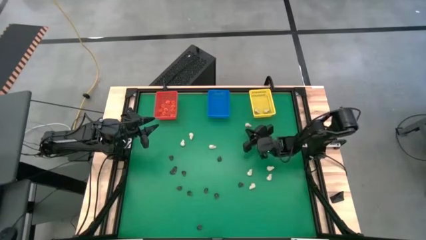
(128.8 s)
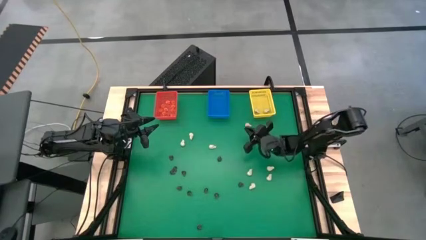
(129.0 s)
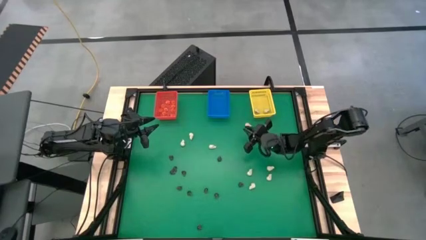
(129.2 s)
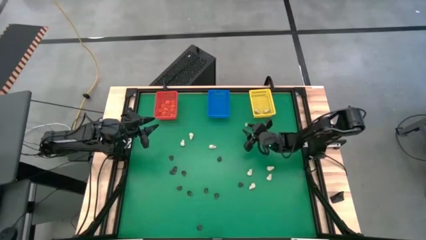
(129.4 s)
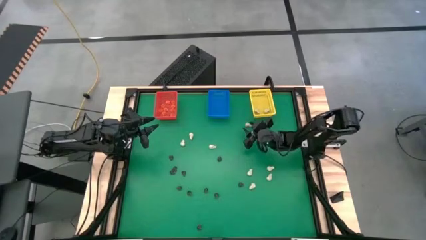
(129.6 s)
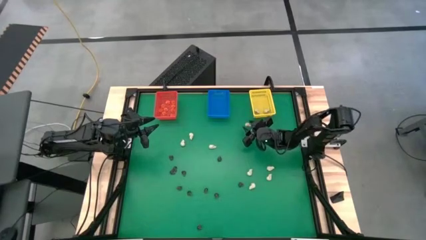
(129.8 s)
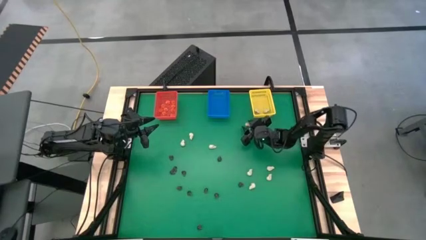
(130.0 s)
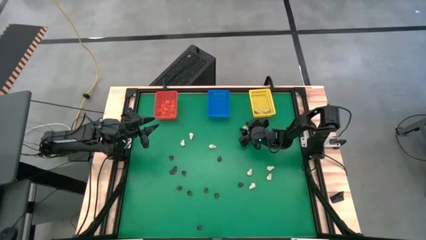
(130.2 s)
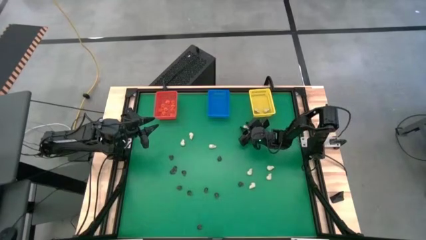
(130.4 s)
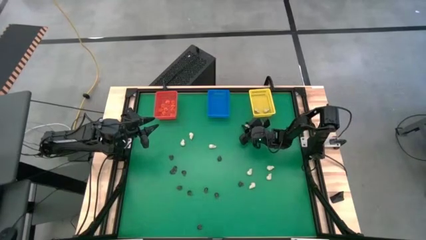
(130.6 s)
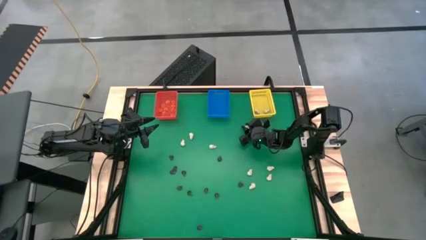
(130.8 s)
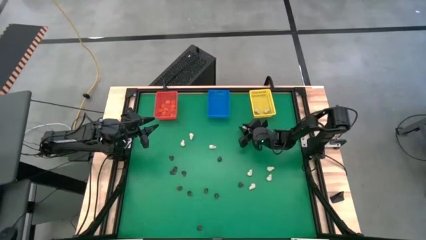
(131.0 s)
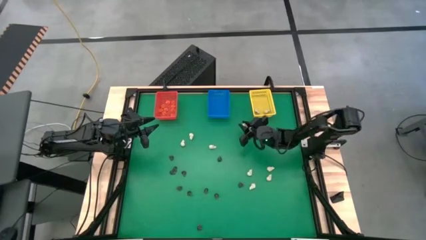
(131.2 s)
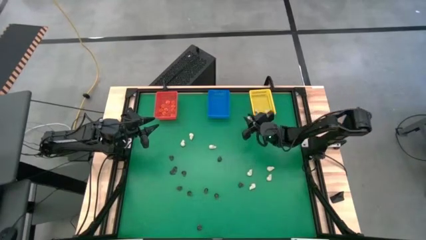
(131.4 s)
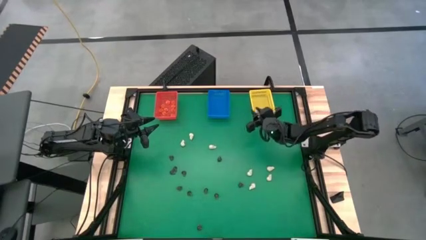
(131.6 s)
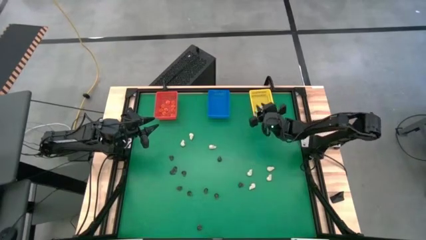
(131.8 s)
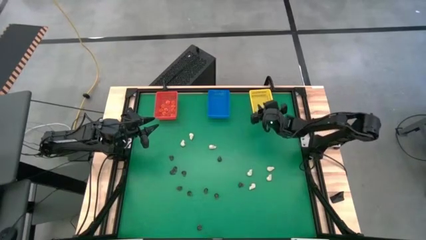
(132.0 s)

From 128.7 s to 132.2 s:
Task: Sort Halloween decoration
Put the white skull toy into the yellow bin

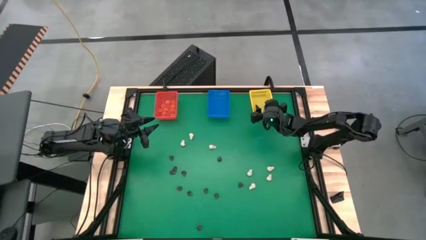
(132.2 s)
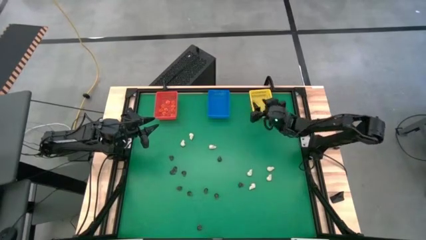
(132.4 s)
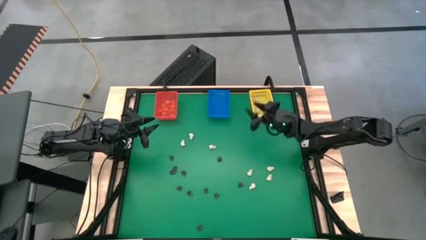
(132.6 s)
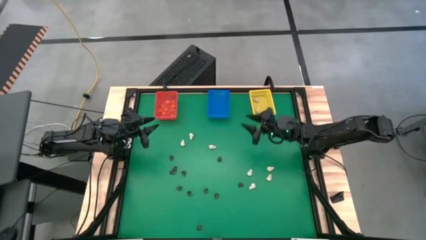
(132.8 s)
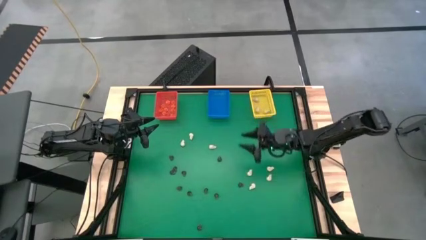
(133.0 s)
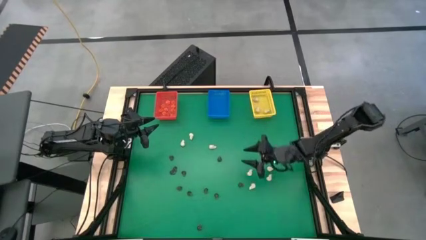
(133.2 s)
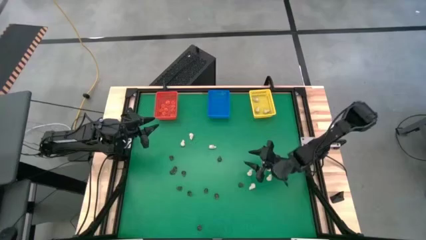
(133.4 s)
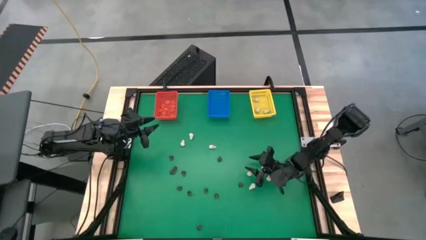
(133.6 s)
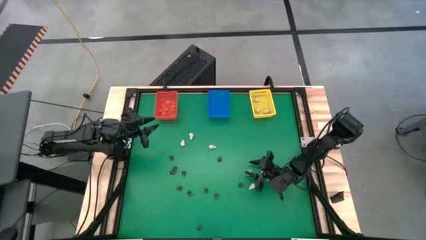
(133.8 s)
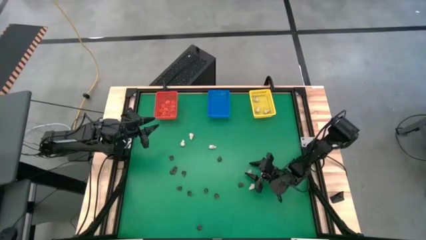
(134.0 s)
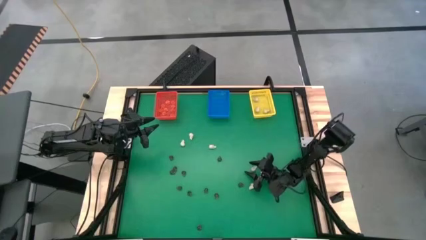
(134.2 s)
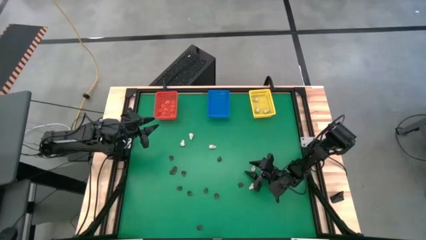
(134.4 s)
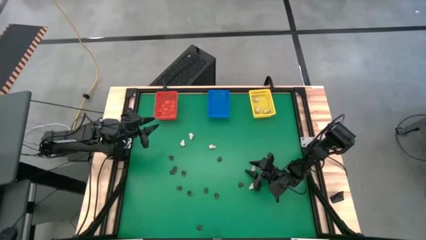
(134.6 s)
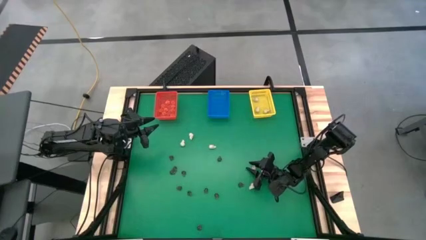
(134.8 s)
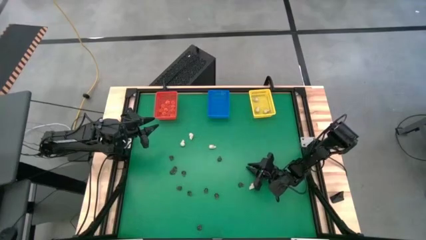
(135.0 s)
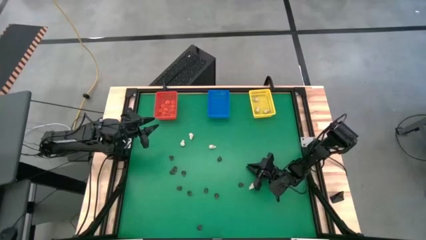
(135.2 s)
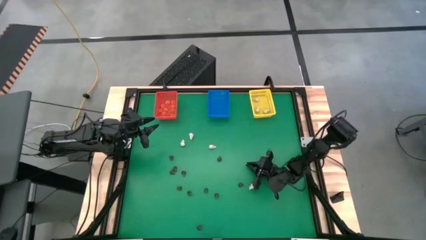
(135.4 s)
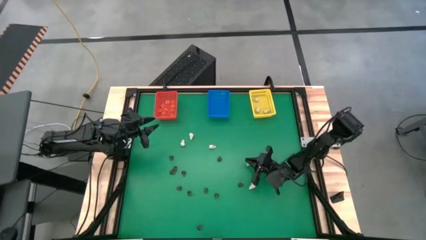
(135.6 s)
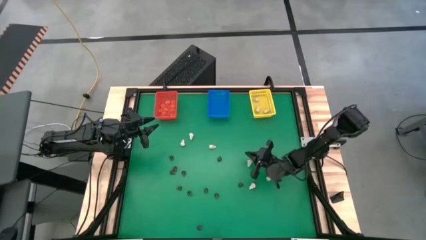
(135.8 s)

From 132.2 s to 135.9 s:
Put the white skull toy into the yellow bin

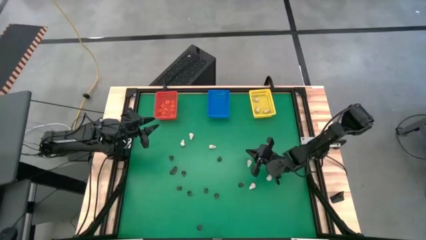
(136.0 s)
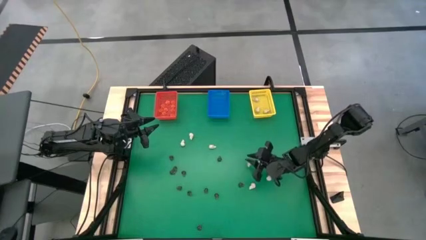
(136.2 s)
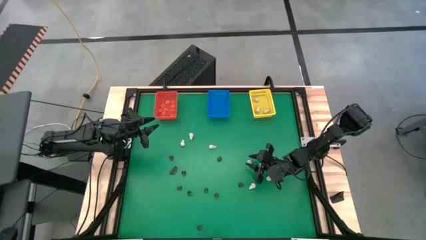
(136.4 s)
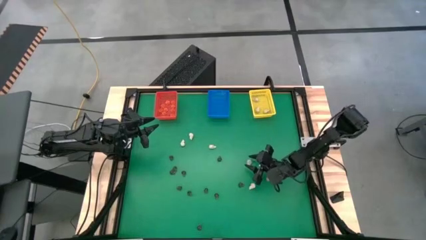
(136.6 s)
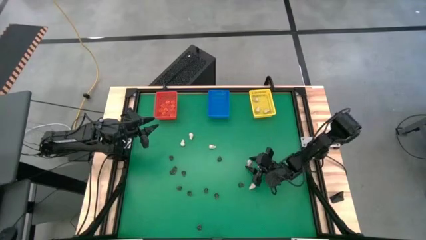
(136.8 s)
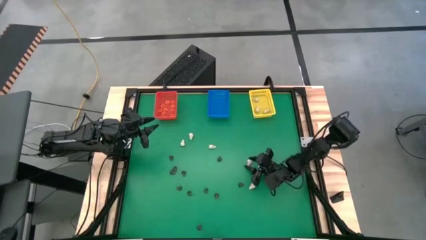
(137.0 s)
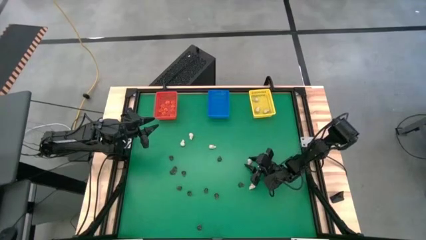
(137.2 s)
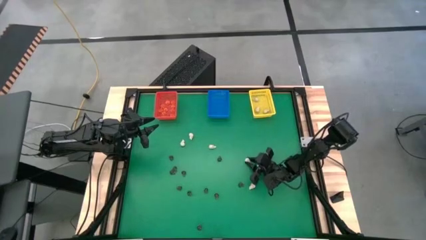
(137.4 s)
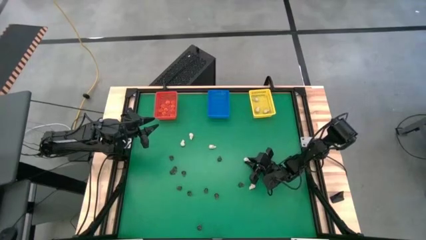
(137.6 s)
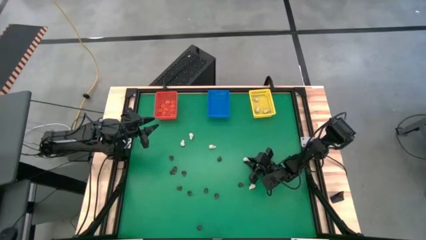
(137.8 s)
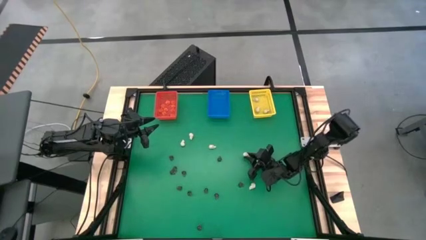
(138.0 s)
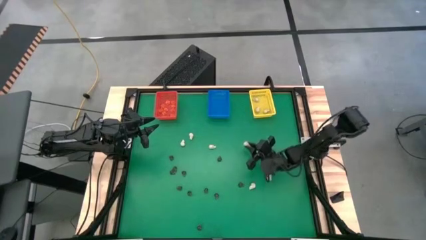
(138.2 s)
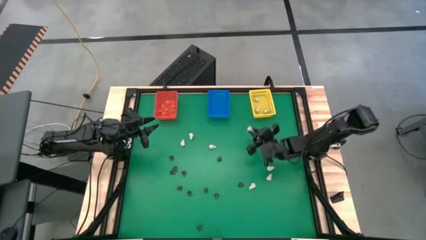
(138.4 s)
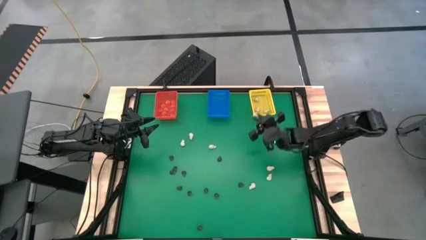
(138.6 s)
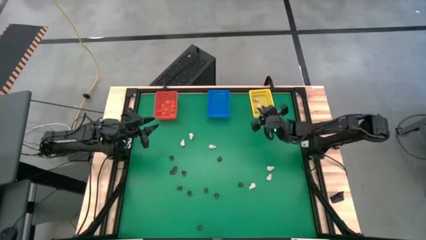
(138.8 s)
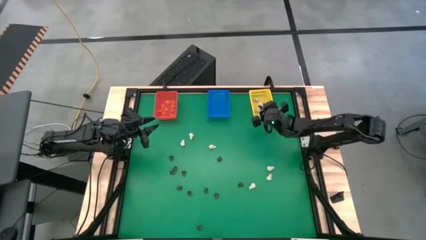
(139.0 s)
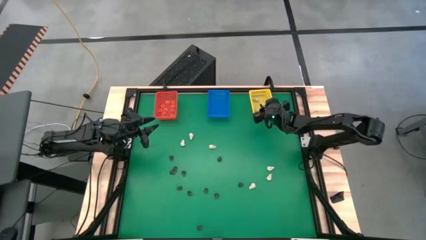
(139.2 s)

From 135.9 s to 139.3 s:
Put the white skull toy into the yellow bin

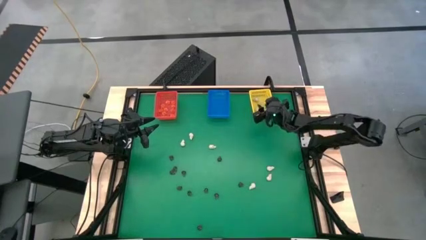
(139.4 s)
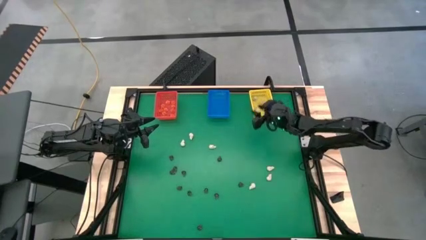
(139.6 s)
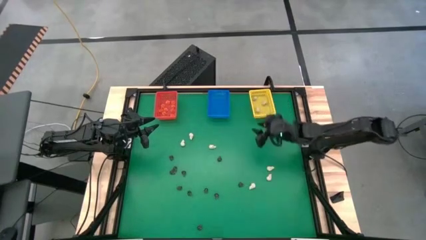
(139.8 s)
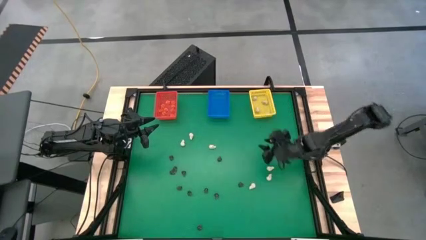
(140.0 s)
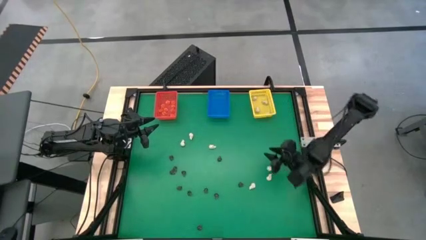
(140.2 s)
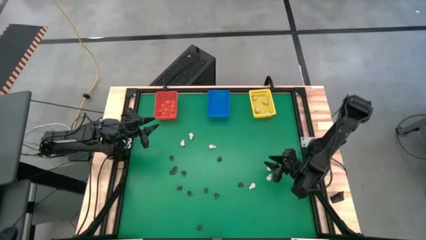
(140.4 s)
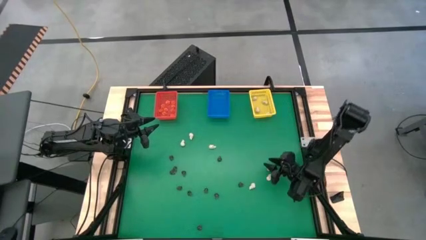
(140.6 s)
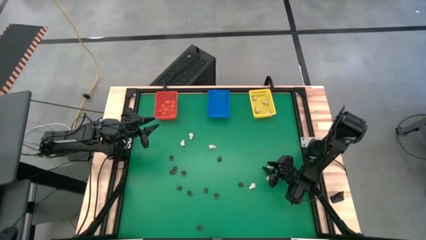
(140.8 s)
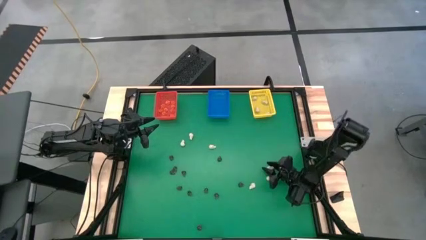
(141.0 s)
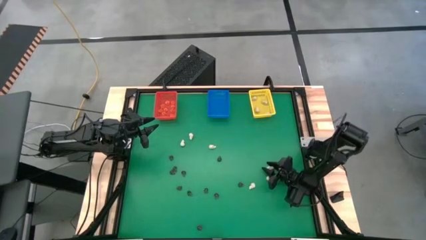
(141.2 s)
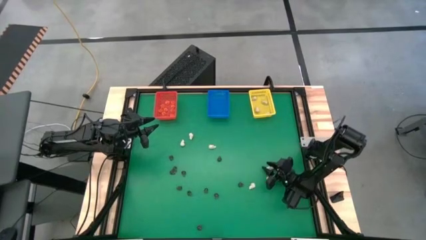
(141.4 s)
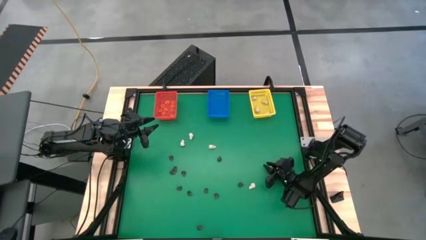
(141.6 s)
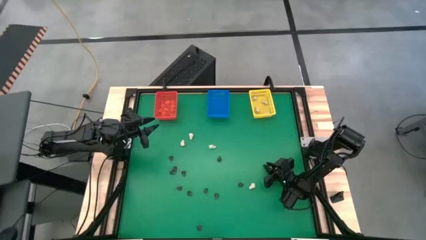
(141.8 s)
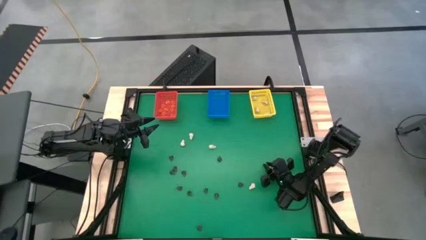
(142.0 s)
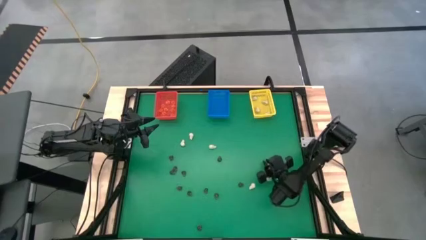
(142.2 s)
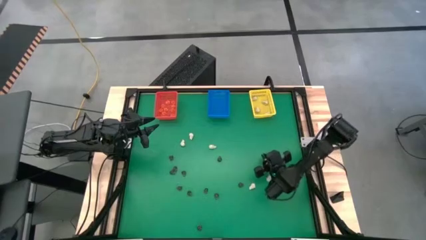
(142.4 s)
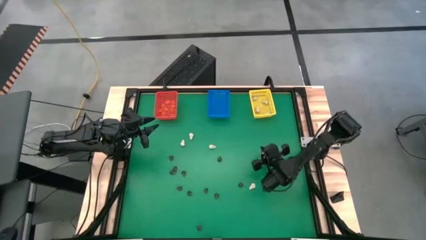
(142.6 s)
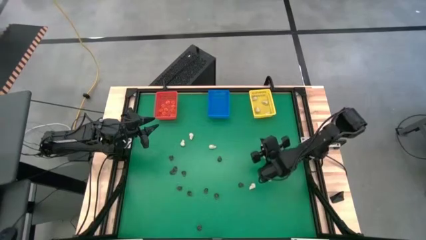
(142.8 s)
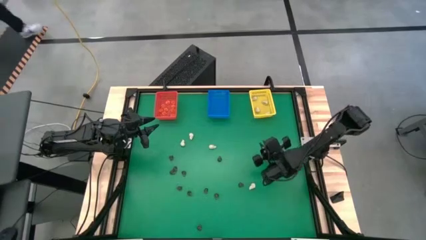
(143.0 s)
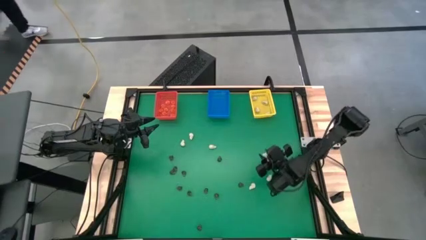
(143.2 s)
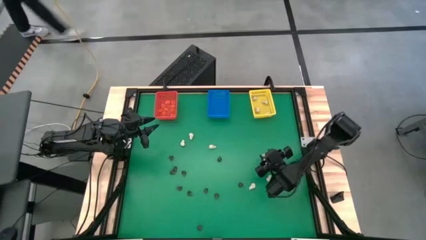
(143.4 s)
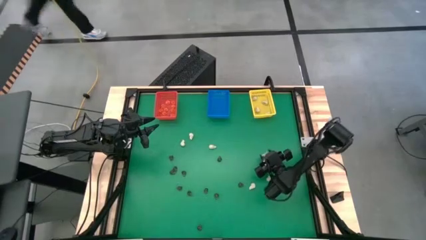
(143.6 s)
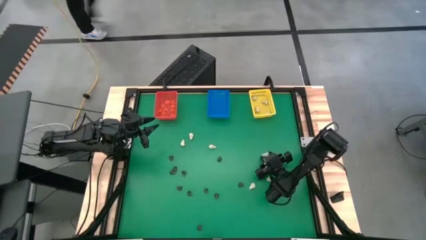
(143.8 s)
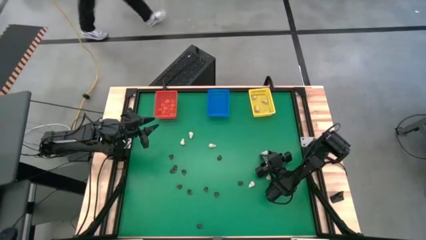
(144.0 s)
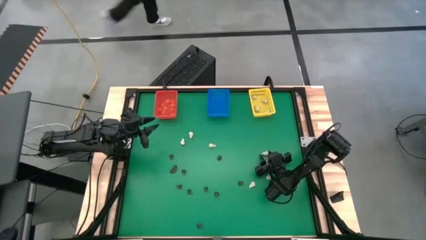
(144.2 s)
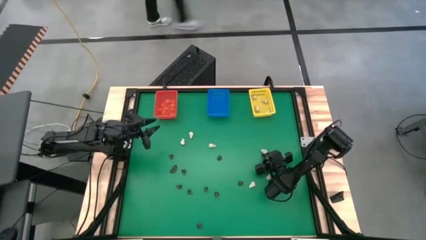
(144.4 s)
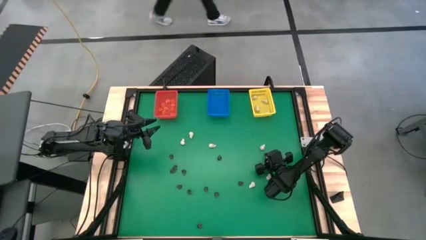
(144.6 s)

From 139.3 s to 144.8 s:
Put the white skull toy into the yellow bin
